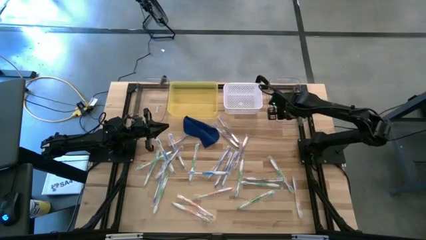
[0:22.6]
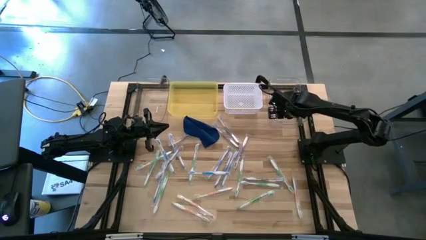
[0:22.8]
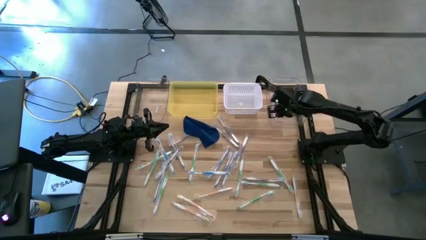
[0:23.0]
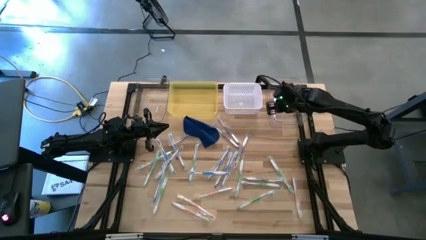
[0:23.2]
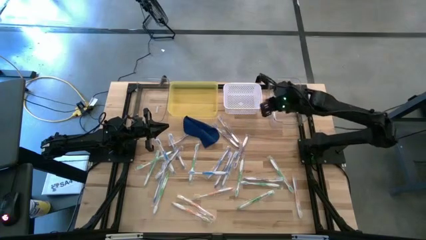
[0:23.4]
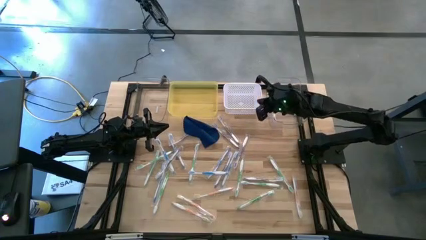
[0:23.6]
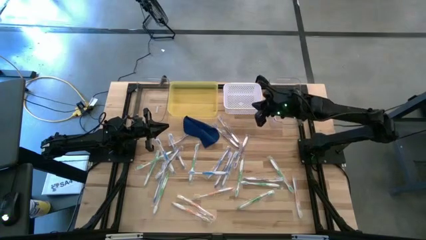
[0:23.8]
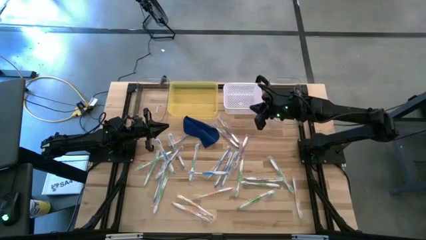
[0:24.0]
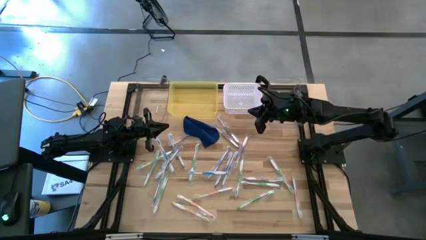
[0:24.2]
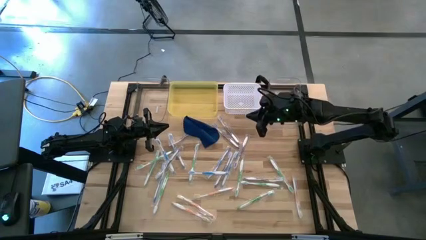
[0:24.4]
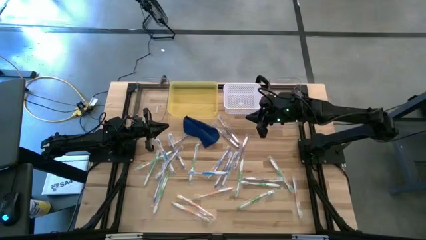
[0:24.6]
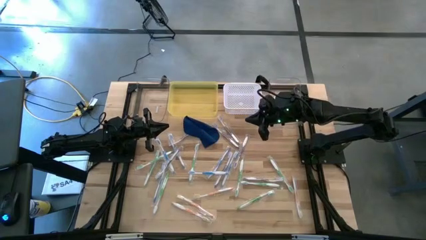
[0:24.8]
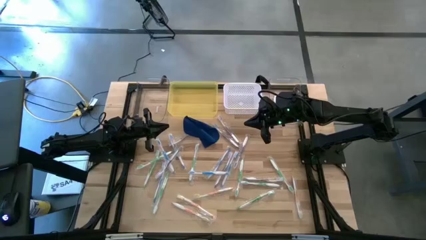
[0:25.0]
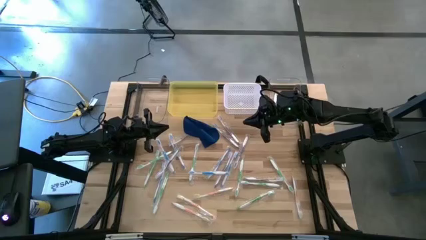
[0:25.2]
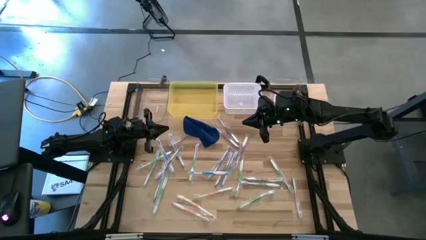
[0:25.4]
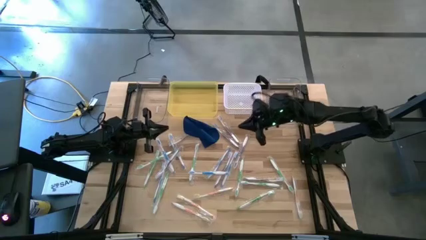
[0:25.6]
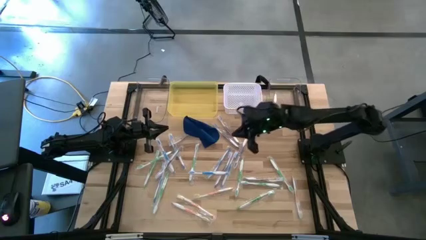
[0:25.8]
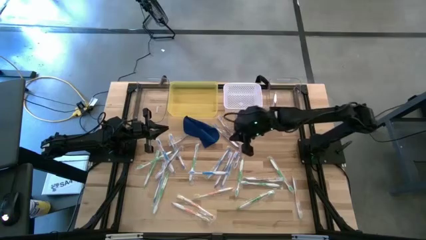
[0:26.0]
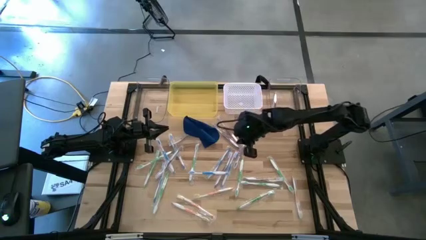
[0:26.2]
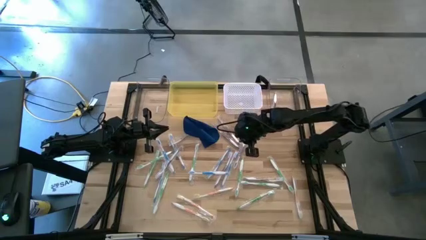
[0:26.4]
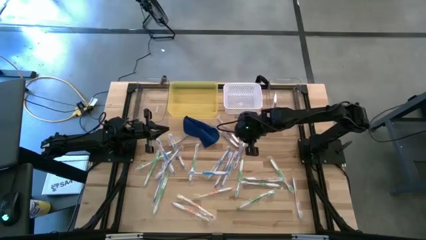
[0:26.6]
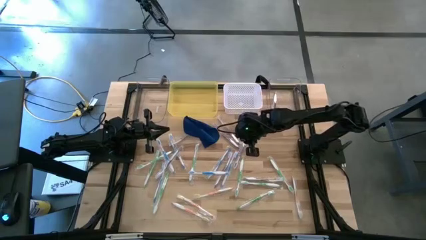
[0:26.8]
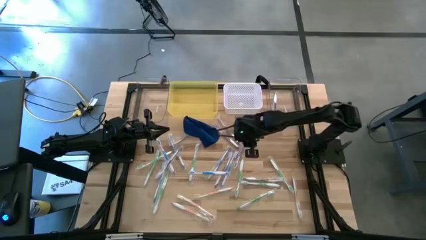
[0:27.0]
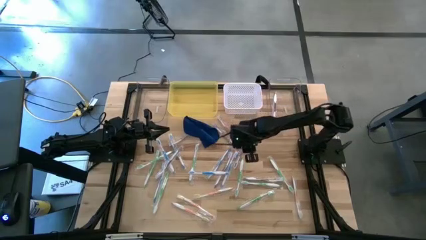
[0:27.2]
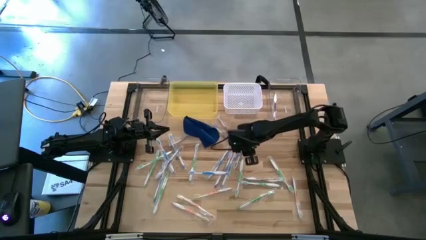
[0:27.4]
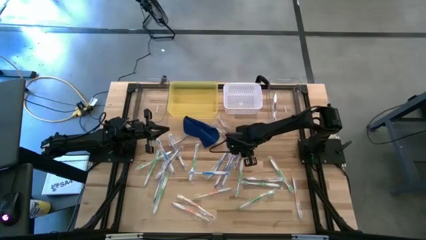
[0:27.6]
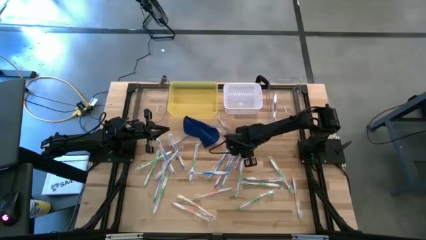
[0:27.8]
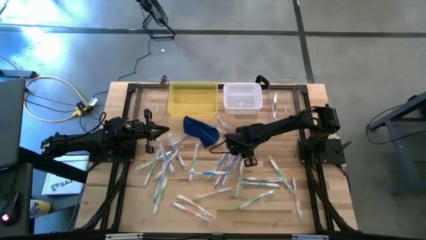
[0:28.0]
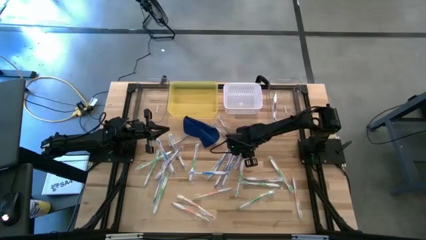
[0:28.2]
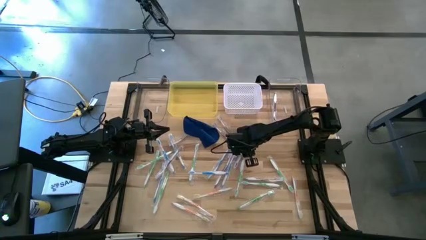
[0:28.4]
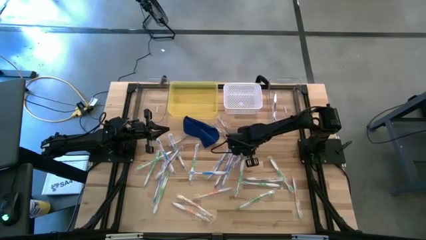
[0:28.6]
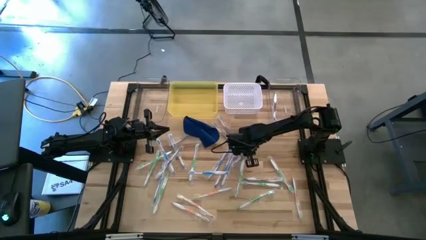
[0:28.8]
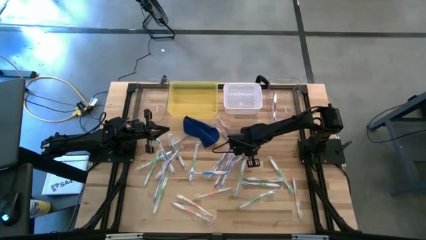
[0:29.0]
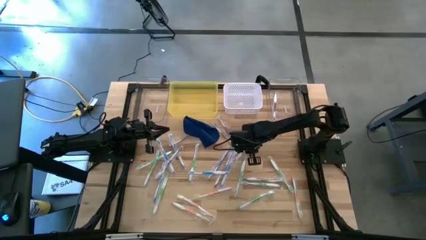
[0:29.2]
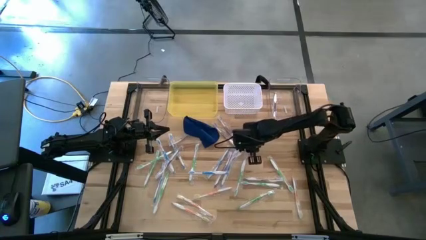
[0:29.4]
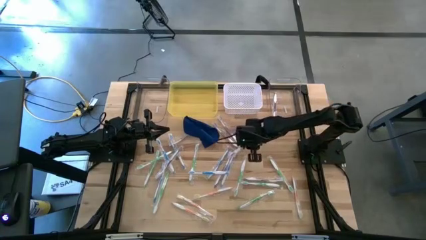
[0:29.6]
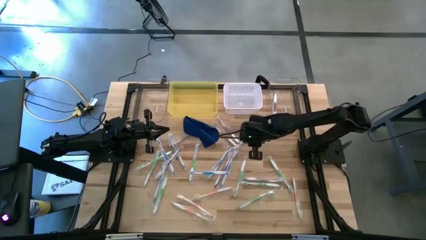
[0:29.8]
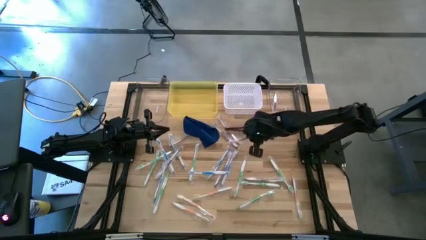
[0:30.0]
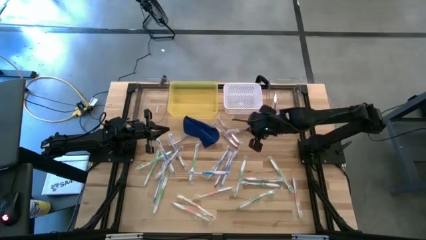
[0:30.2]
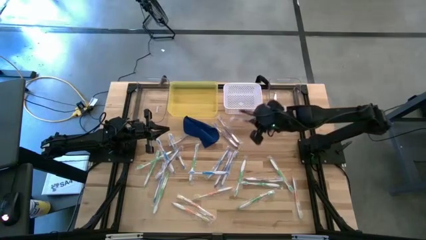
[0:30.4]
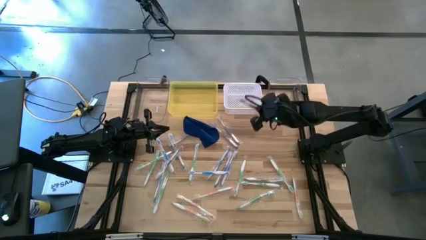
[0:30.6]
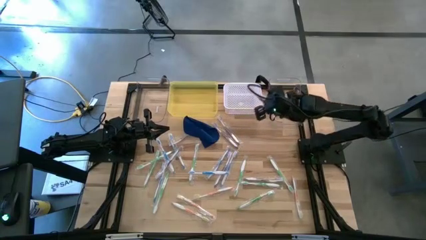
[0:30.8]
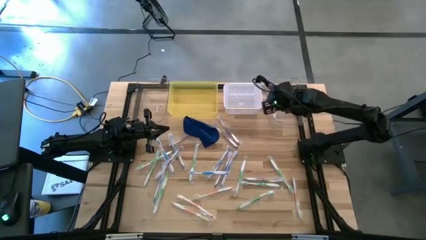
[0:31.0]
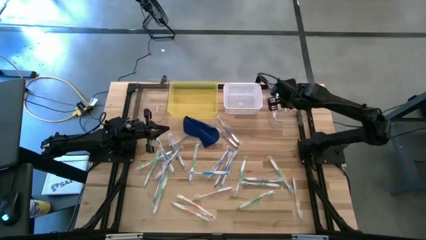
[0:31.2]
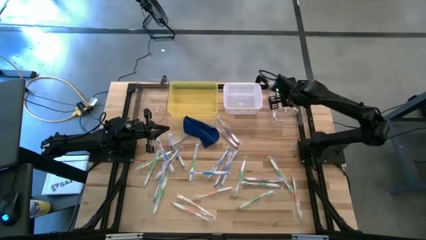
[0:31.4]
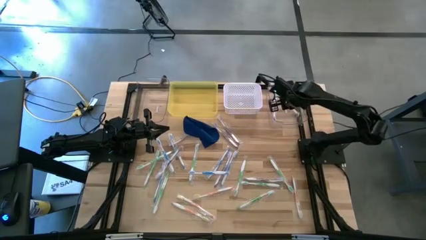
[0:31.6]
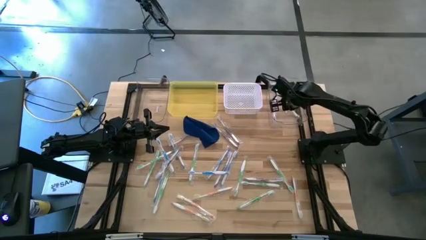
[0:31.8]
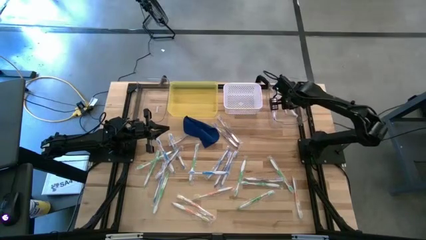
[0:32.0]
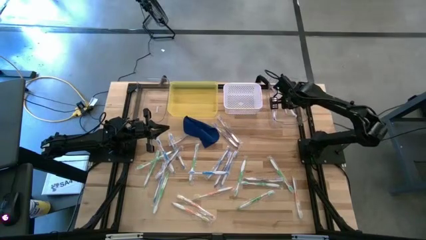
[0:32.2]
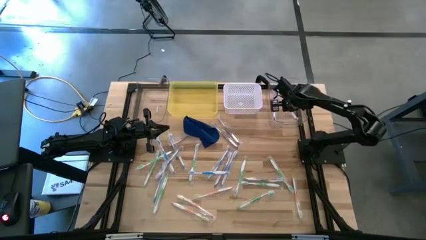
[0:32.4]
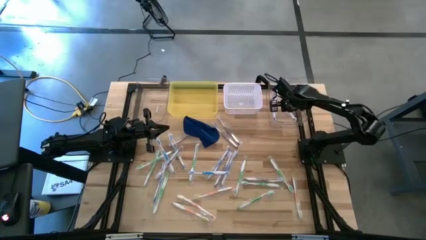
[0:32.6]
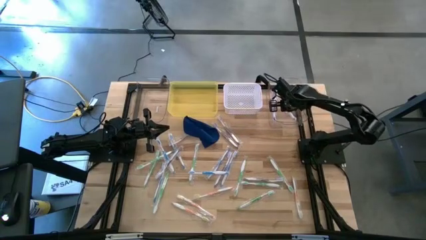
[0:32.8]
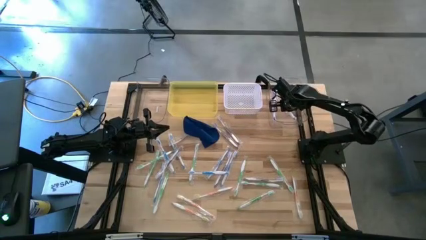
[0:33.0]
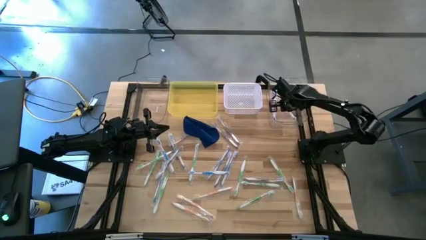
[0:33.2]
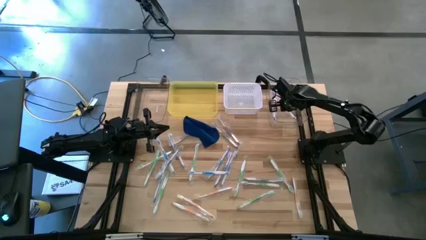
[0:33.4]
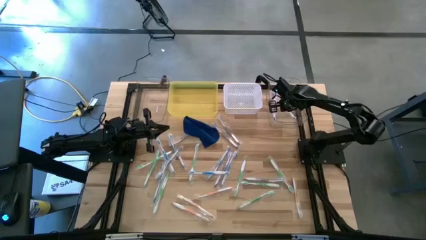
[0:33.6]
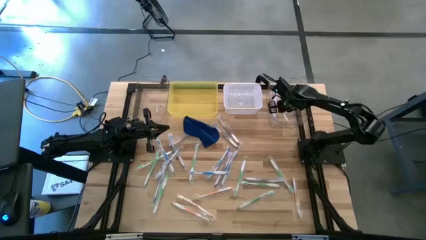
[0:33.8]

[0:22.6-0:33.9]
Task: Pick & Place Toothbrushes
Put the violet toothbrush into the right transparent bin
